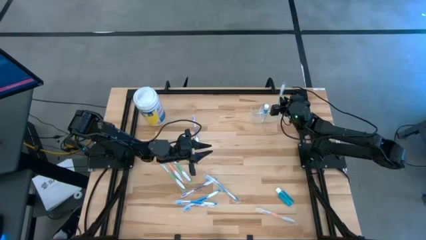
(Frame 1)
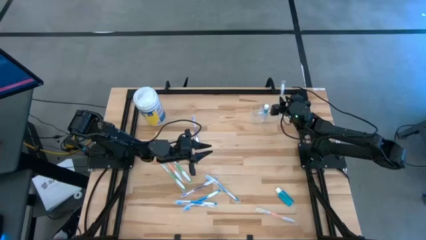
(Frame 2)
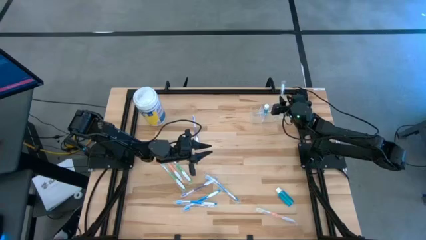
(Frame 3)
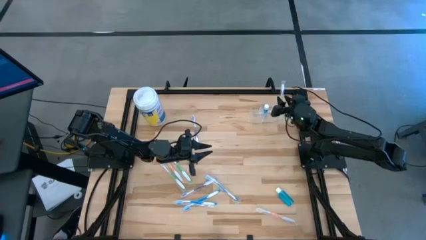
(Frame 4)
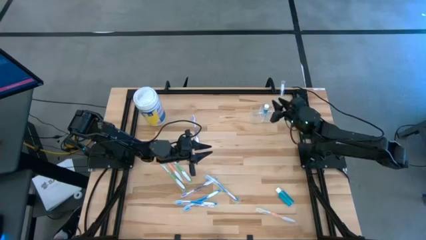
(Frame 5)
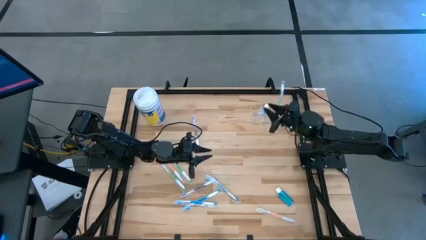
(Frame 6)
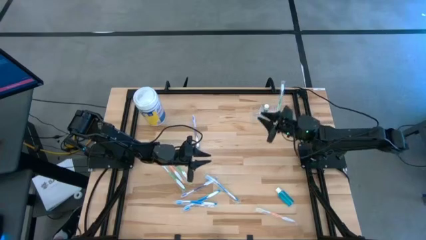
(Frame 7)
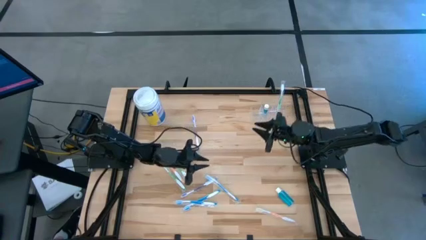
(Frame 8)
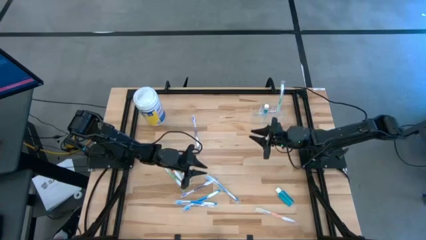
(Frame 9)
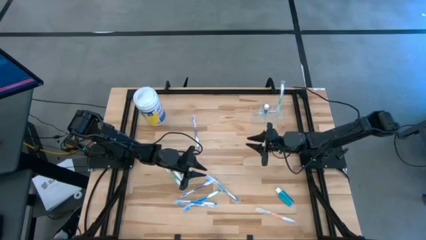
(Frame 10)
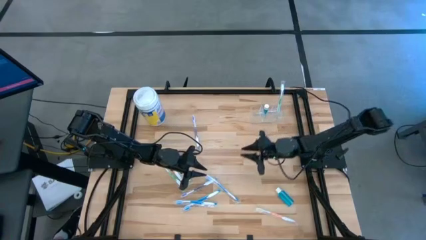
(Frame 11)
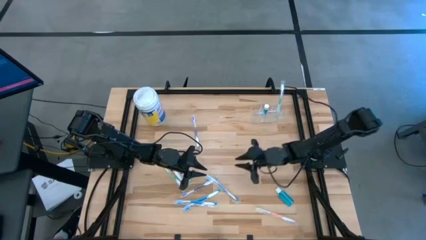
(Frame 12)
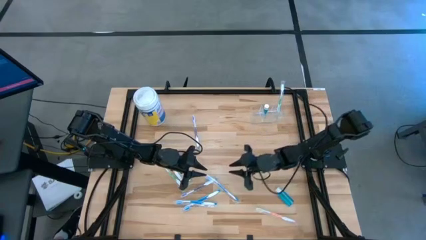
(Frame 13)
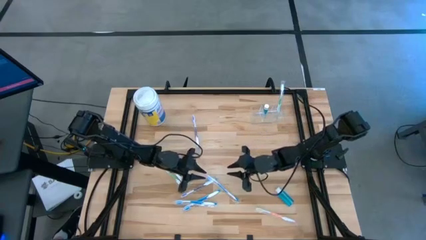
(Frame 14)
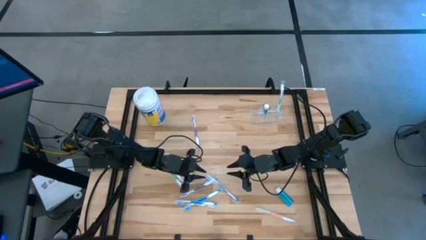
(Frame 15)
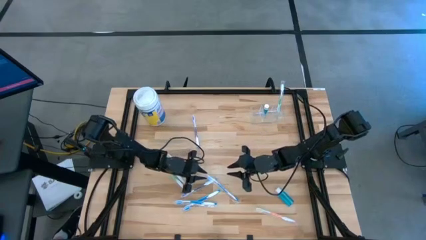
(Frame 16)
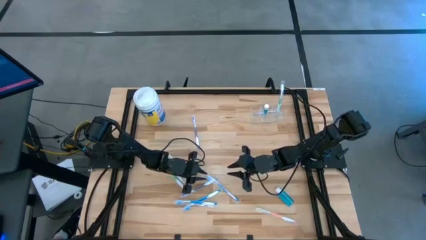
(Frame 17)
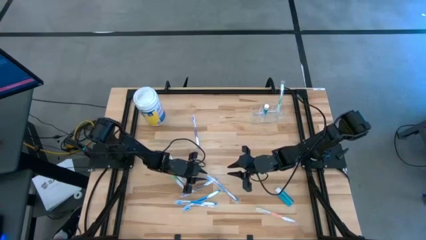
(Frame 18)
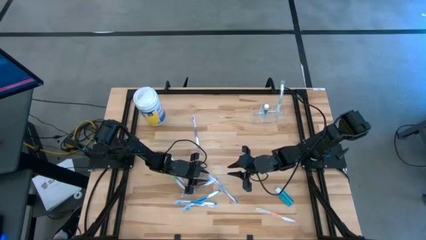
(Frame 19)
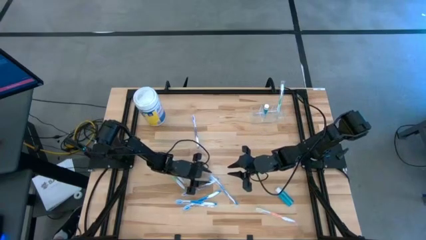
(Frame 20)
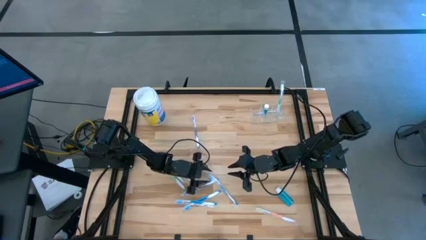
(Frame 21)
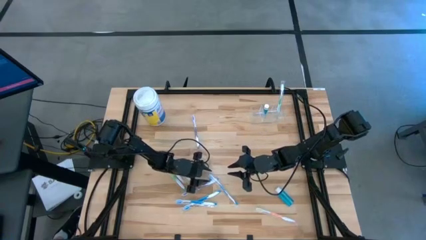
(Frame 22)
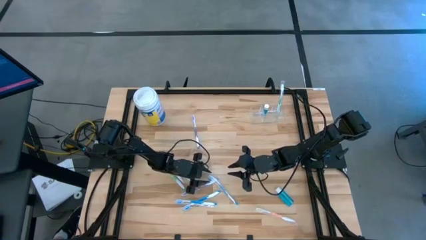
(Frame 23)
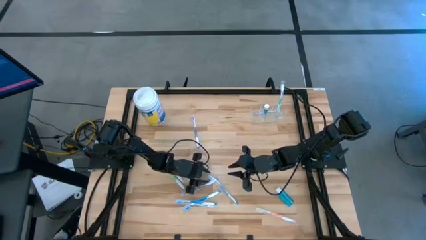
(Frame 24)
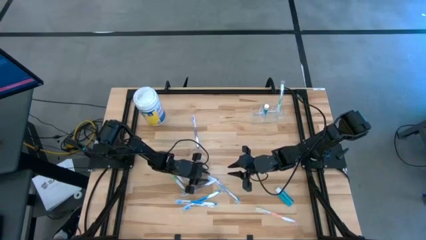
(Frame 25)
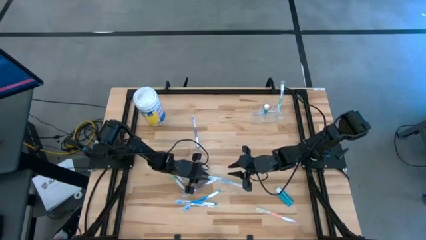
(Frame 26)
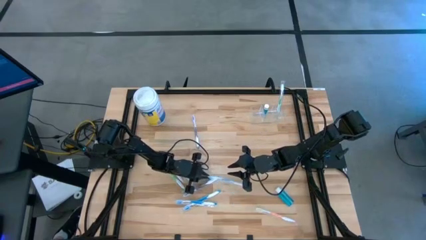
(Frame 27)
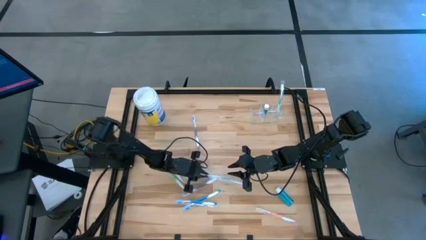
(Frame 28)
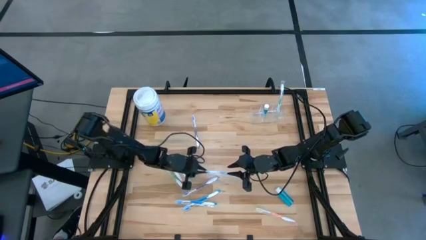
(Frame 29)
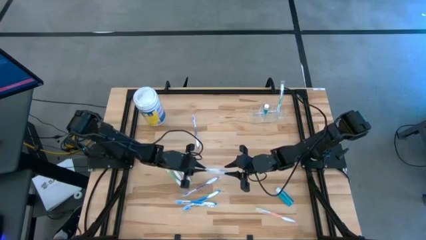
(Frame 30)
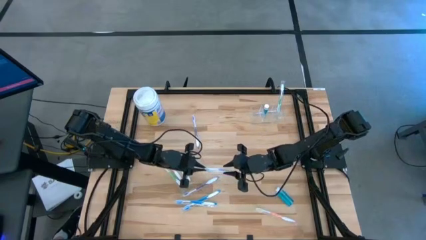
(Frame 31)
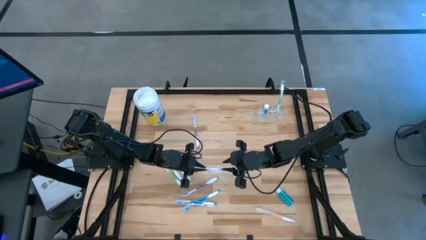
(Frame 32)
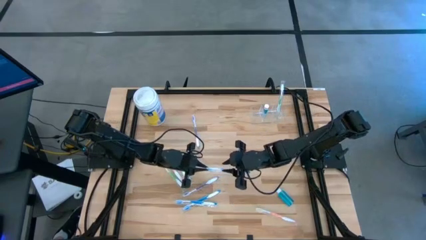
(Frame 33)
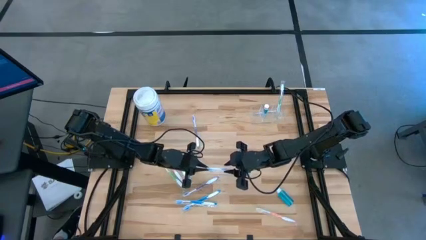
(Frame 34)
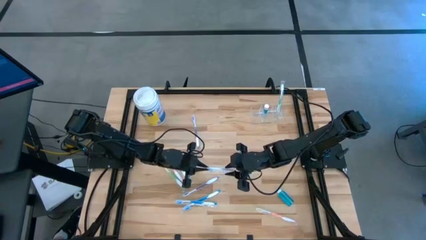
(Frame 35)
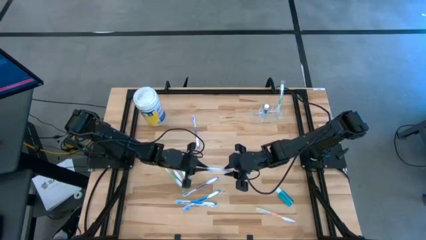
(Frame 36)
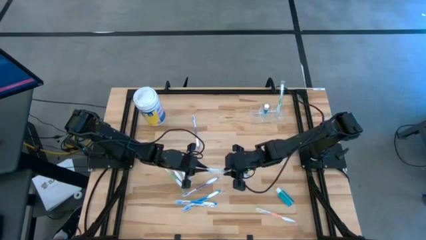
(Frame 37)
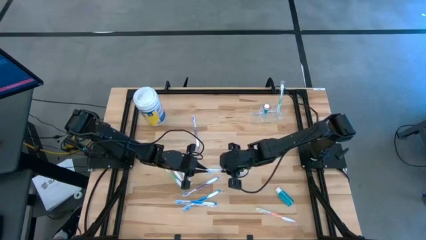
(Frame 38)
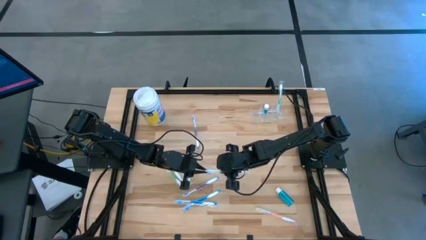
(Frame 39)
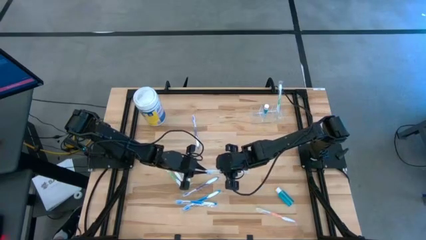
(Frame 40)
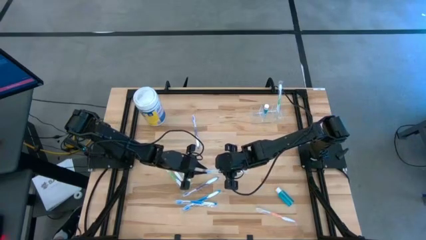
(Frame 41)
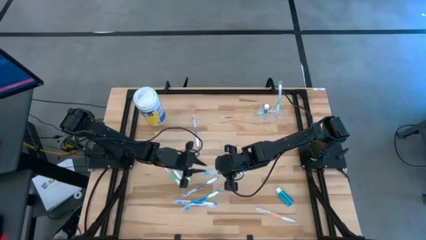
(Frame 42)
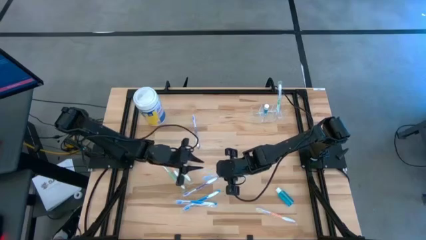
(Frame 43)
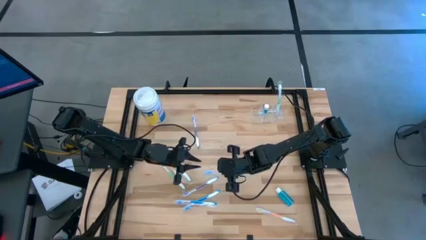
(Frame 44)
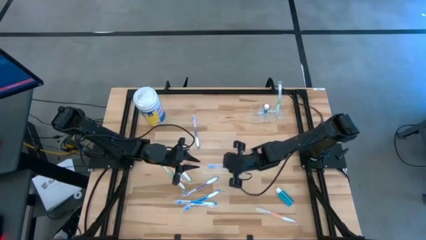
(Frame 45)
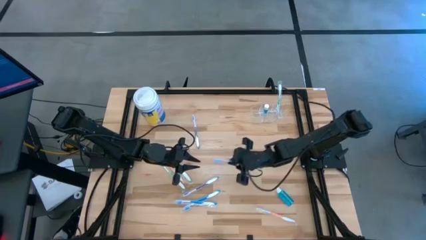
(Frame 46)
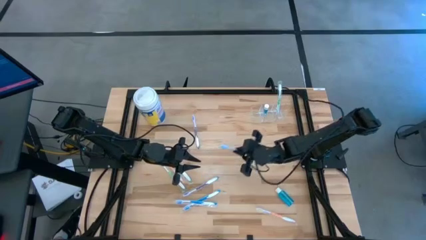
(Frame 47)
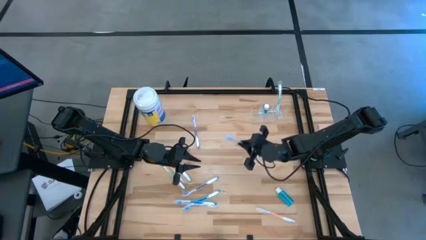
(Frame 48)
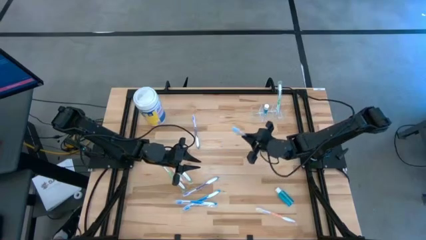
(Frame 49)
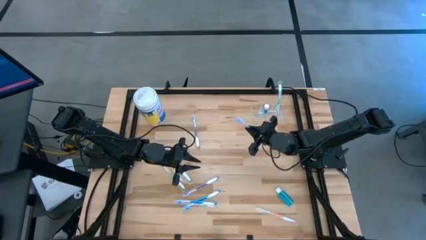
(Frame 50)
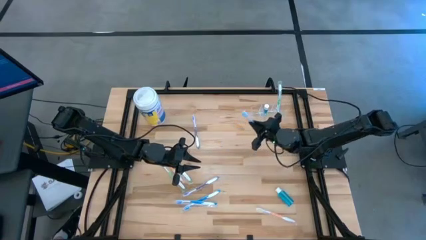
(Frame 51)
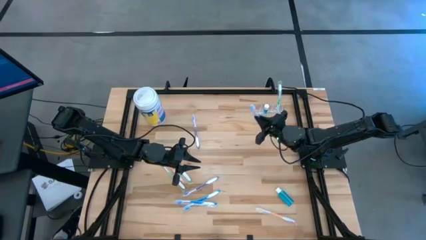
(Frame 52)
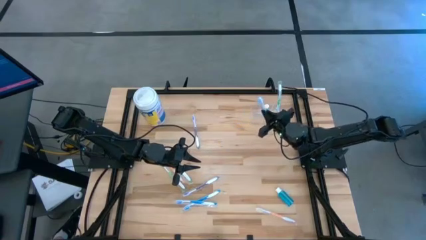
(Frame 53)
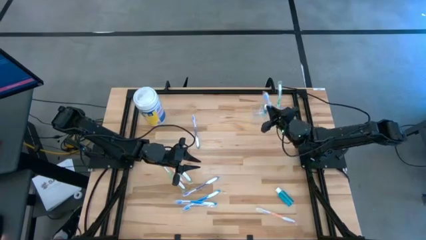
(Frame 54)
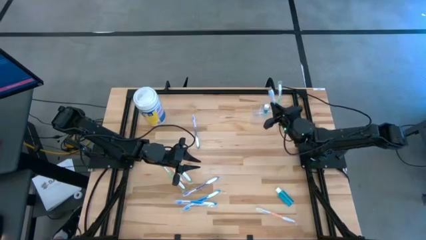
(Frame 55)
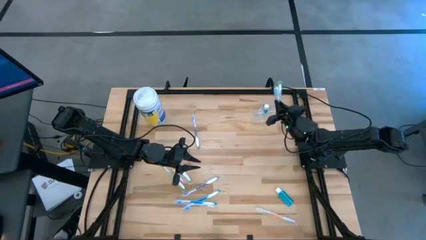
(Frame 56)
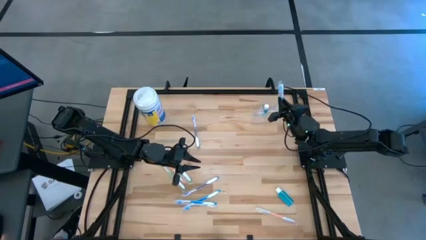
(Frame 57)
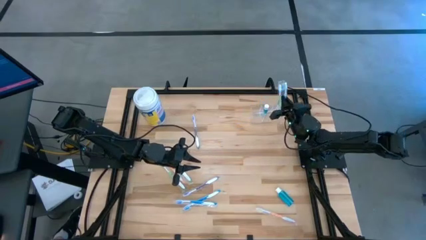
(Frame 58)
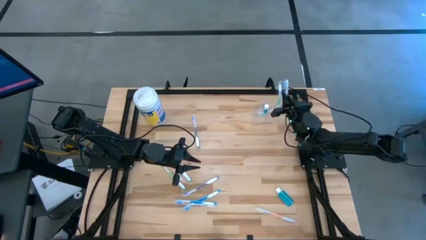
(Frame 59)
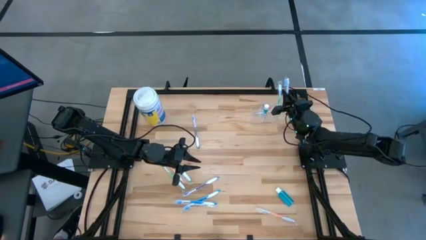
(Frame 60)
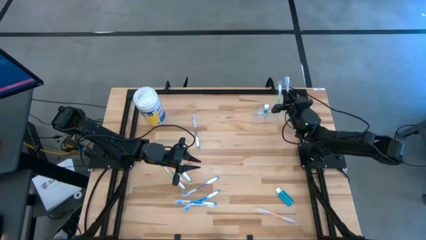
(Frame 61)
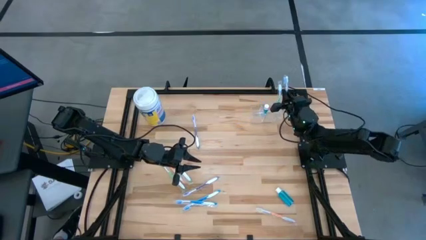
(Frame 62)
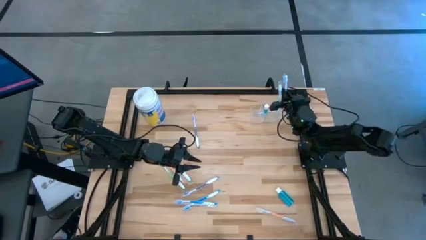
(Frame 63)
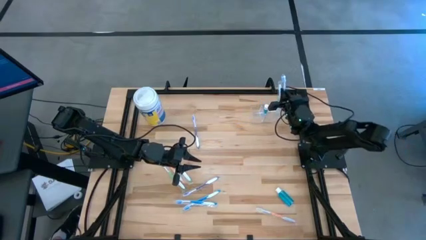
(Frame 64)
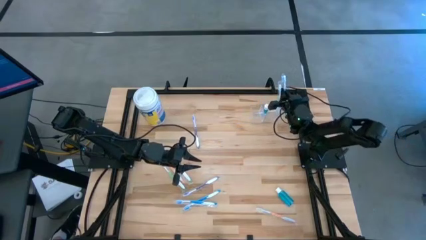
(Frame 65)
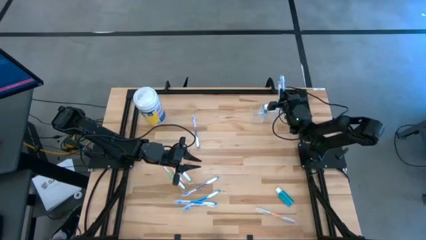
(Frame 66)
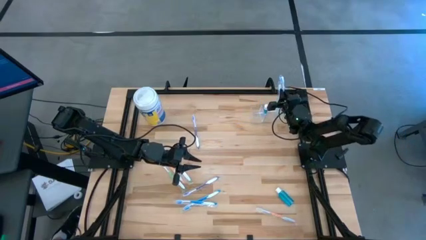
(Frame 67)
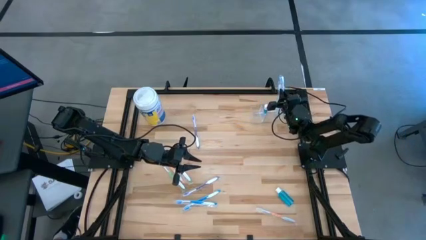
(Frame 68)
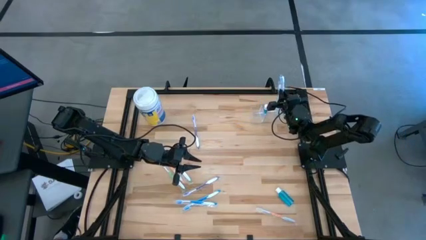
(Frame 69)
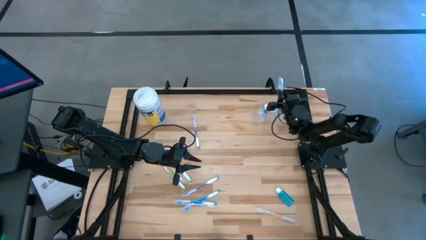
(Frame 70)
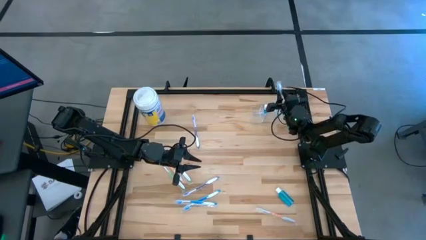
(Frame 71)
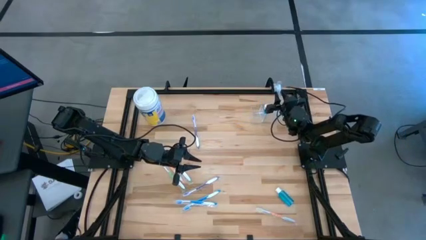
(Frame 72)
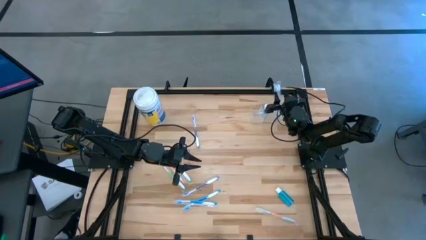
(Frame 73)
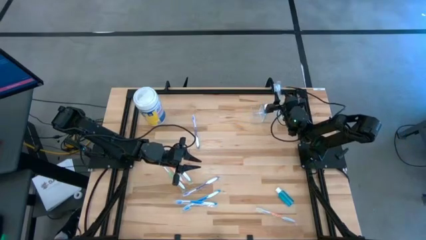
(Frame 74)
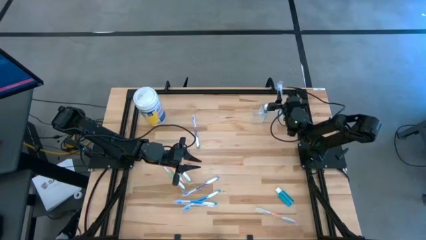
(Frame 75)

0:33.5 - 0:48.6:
Task: Pick & Place toothbrushing station
Put the top blue toothbrush into the right transparent organizer
